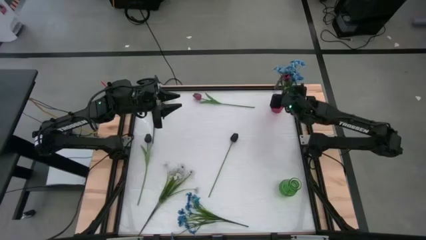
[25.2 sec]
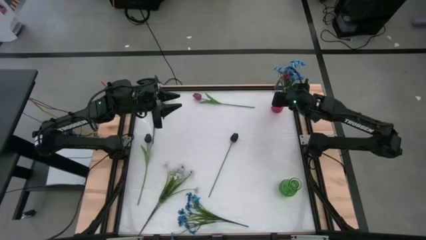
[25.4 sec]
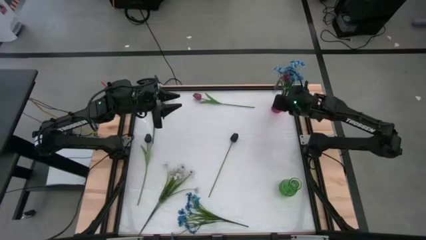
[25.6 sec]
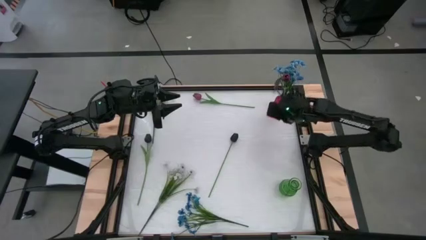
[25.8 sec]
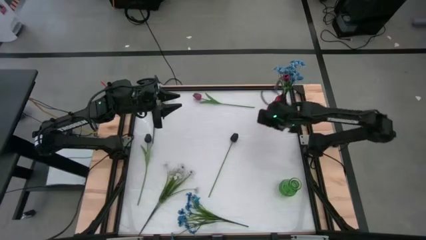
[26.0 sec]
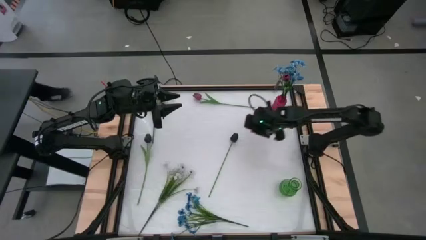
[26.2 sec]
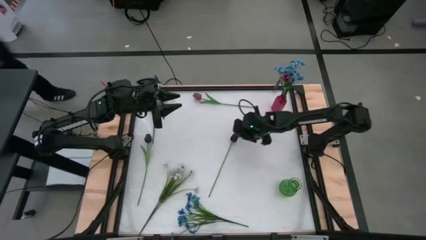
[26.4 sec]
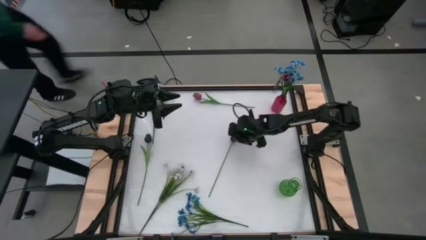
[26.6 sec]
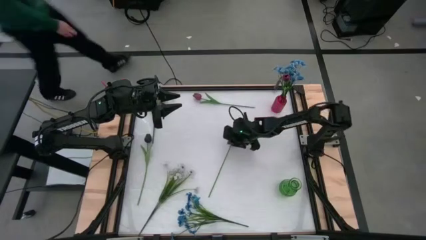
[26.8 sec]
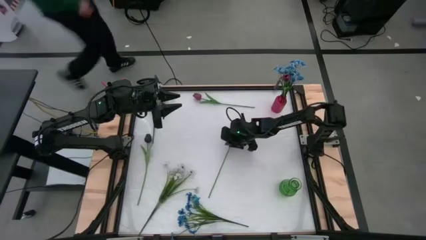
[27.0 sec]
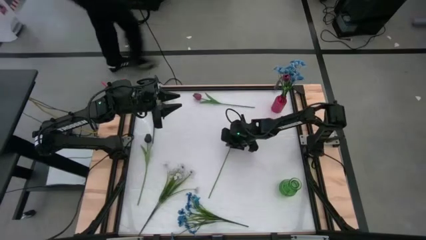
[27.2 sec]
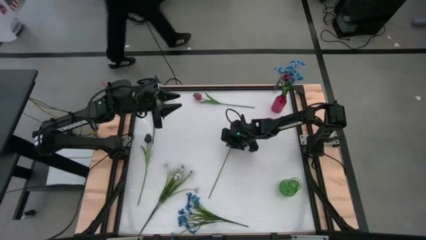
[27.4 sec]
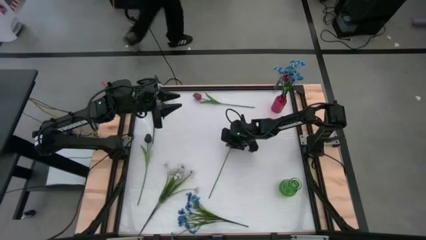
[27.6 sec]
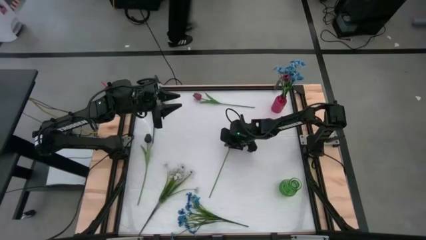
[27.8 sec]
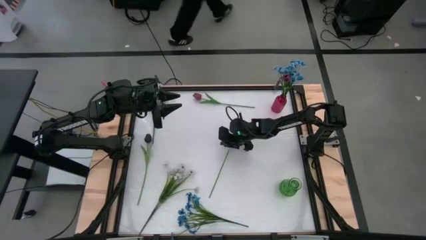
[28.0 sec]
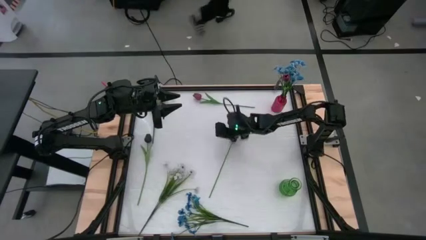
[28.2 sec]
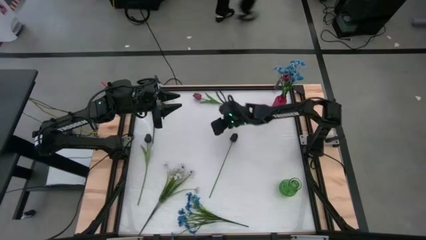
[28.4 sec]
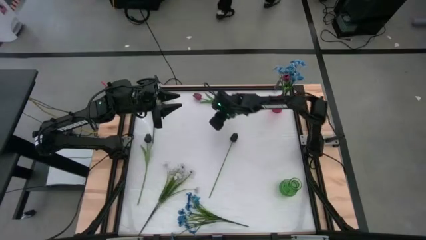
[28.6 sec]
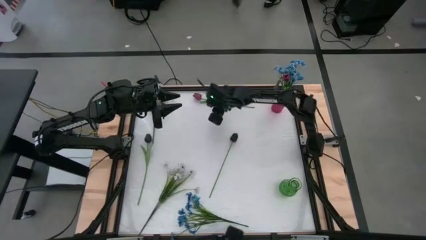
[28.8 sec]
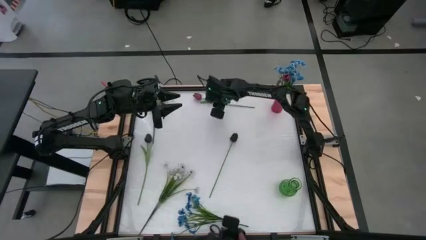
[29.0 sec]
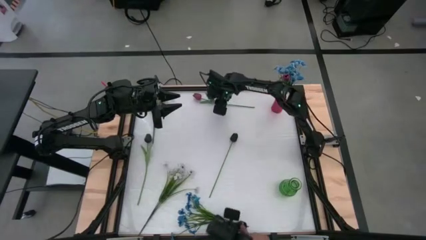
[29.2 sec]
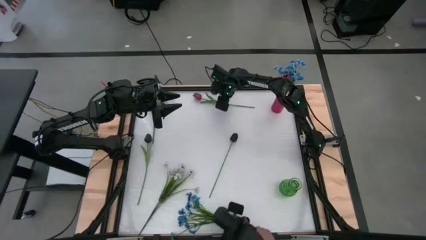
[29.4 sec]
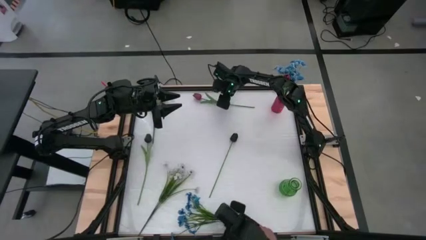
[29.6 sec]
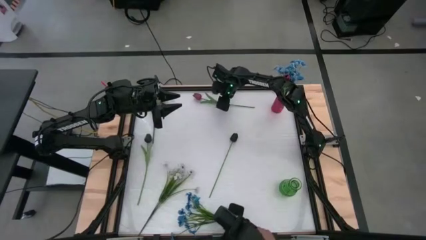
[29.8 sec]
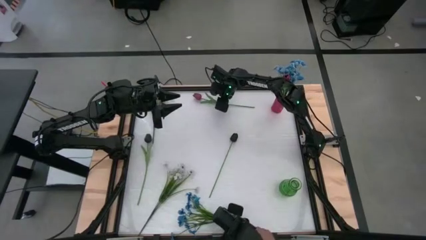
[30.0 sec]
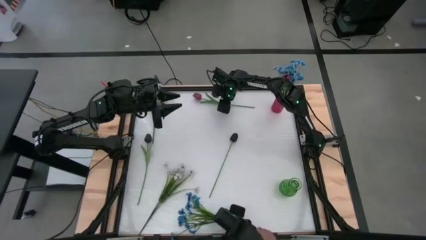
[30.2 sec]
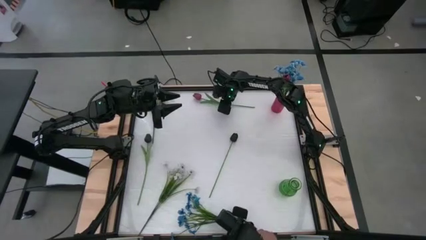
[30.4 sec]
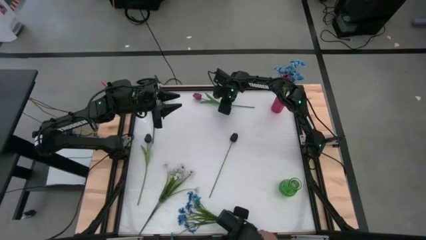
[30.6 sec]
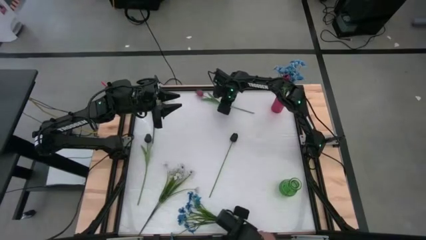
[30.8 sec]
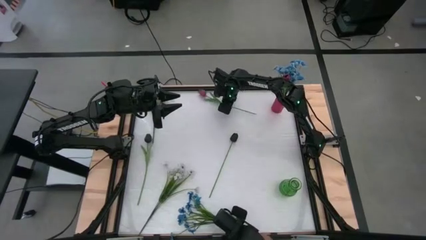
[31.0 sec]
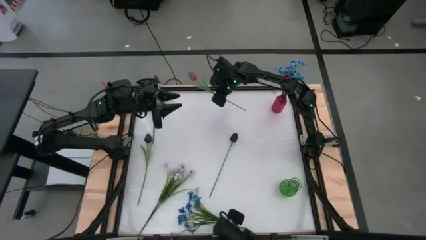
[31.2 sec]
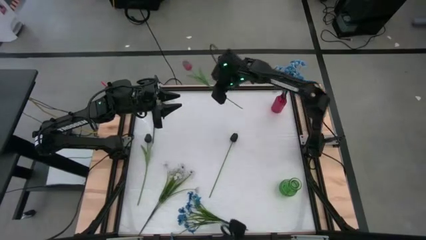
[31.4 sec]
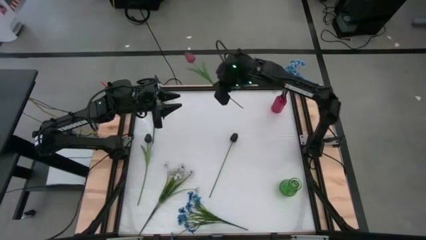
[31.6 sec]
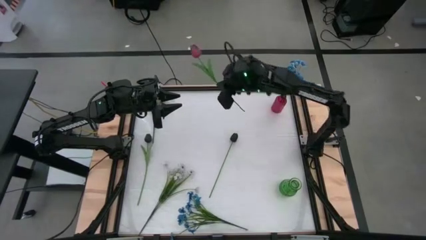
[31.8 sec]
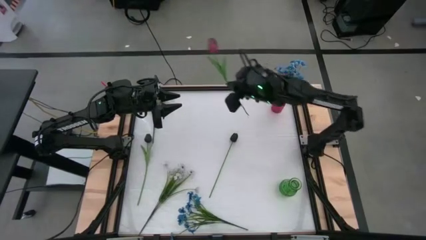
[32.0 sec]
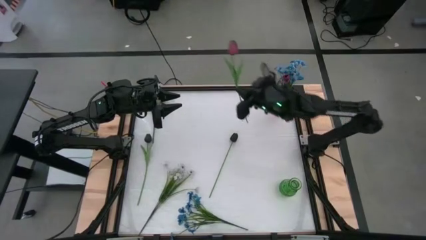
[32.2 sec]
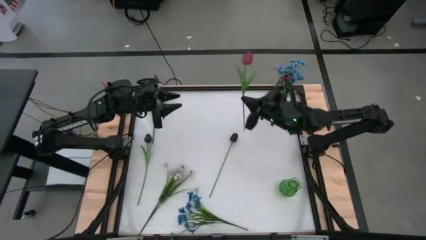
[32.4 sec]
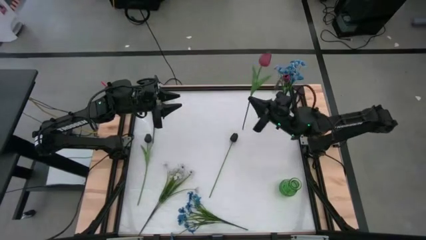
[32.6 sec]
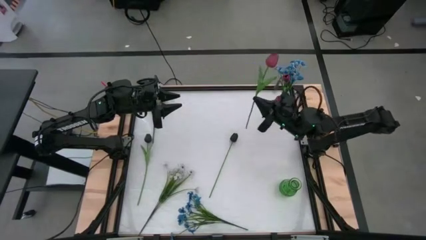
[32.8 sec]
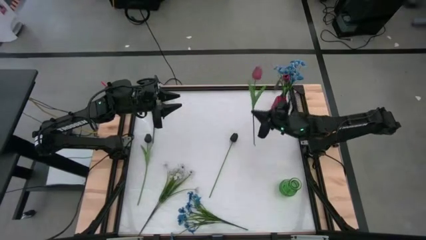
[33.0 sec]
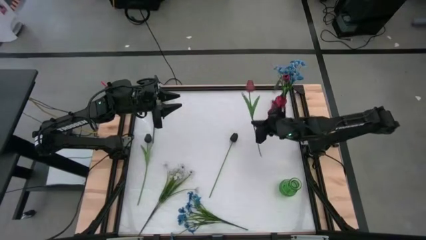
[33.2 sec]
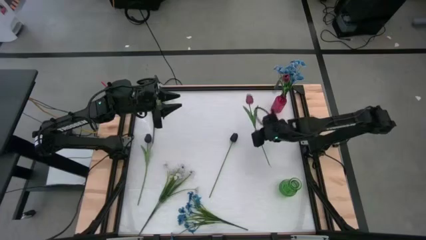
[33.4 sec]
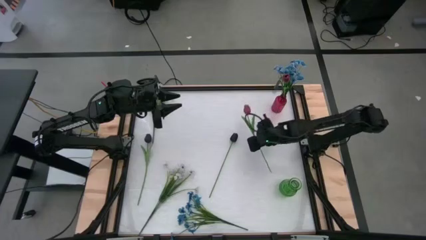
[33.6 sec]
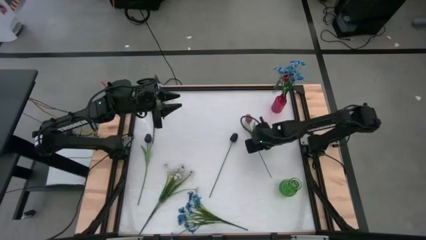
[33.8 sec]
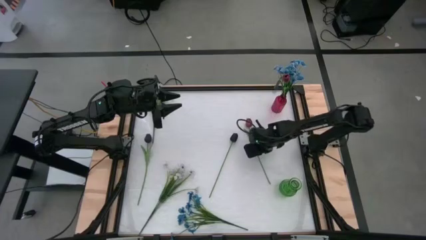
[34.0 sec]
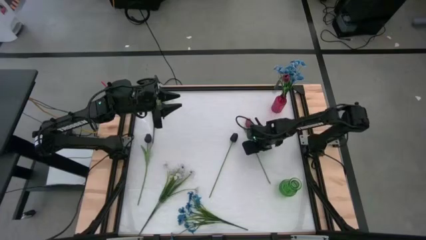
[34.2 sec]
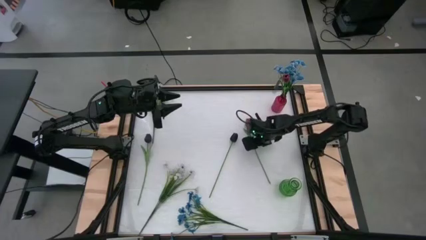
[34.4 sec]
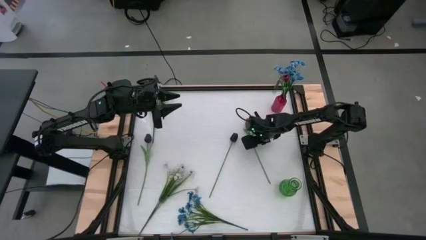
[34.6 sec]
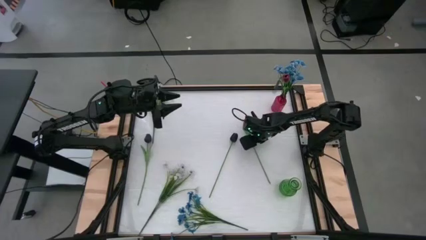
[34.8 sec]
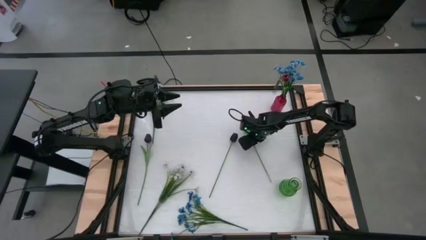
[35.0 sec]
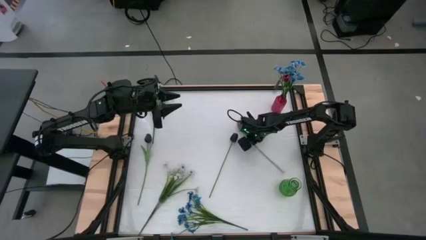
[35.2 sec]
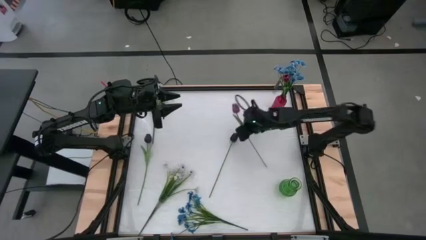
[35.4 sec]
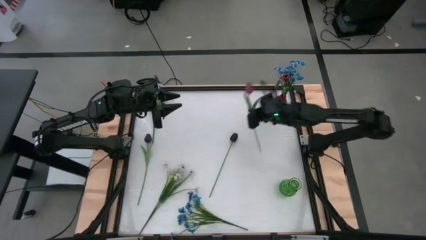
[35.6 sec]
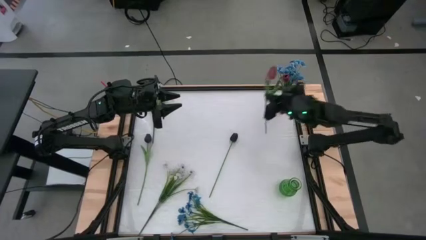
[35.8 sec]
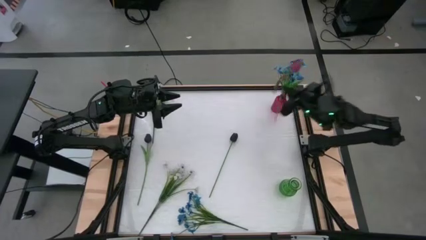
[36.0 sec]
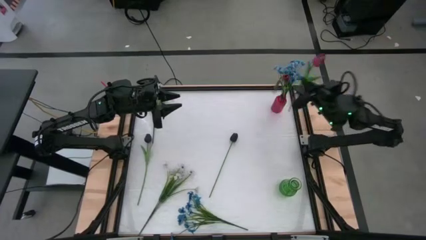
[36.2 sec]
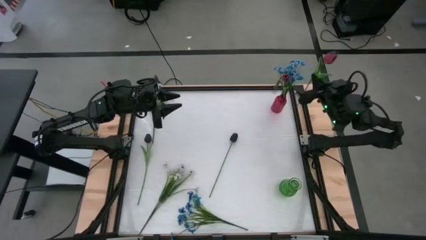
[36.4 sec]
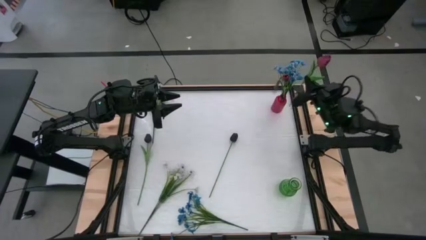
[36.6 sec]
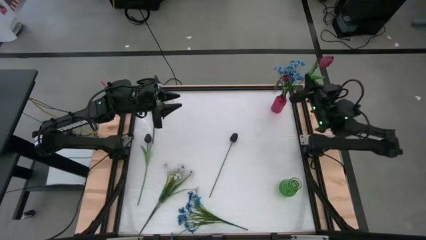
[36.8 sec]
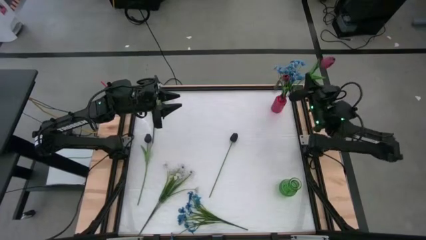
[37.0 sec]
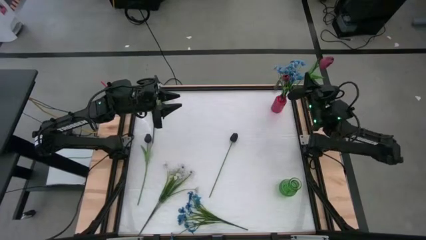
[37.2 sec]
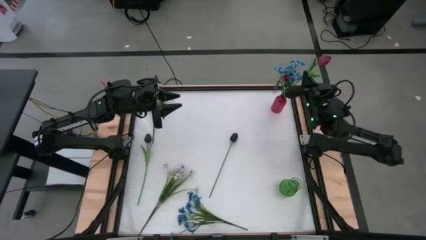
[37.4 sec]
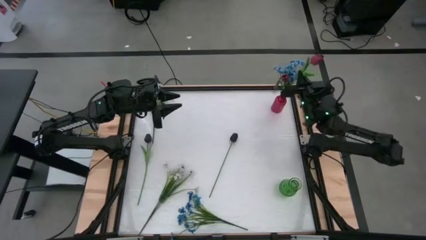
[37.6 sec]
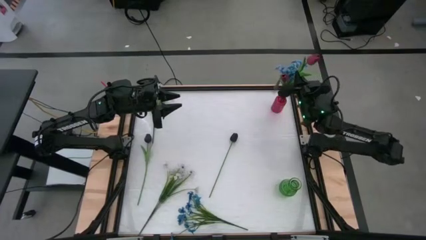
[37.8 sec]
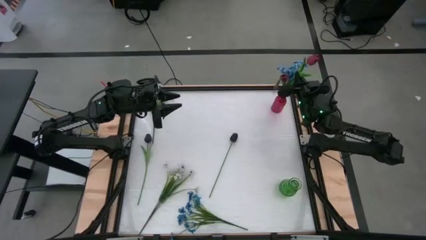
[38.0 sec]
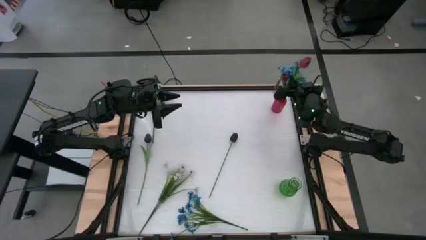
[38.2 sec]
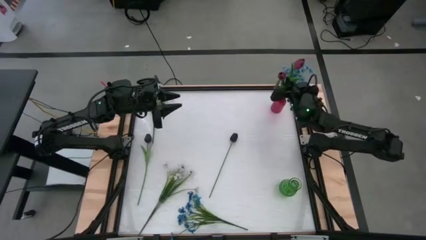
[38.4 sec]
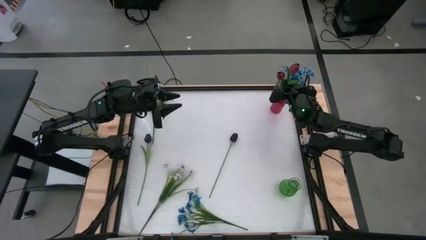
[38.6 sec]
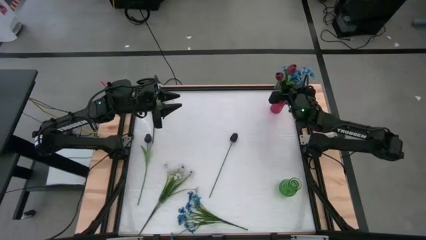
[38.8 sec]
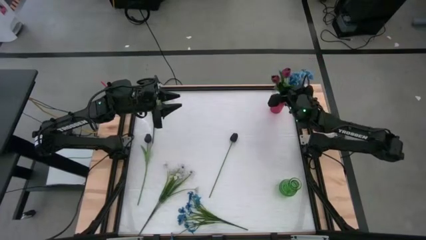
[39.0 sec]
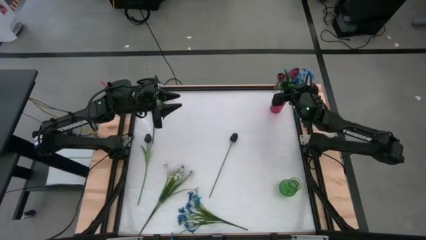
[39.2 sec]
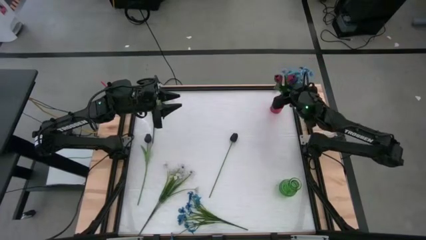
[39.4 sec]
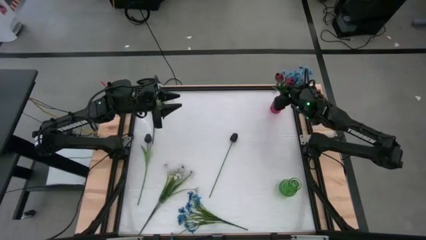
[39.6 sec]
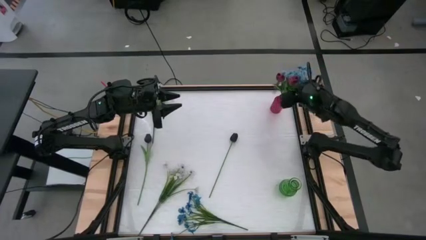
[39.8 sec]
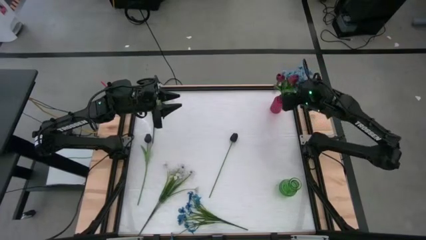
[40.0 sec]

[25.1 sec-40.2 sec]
Task: Sort flowers into vase by color
Put the pink flower into the red vase
